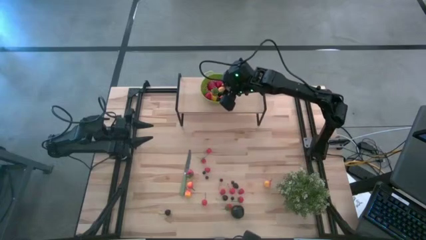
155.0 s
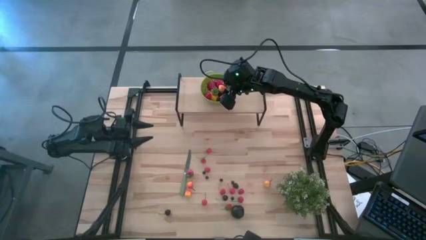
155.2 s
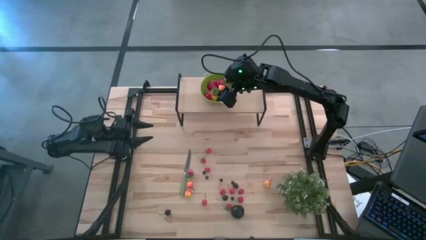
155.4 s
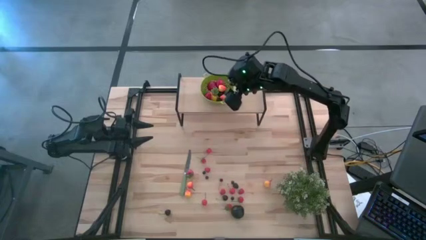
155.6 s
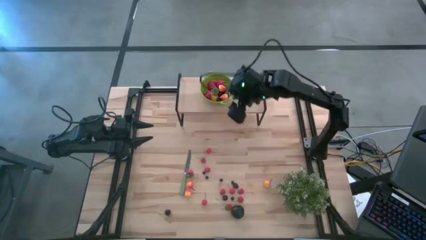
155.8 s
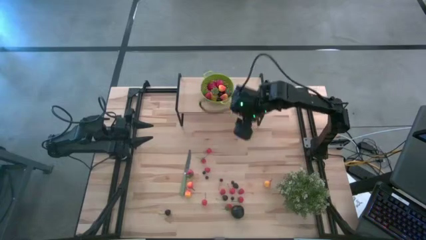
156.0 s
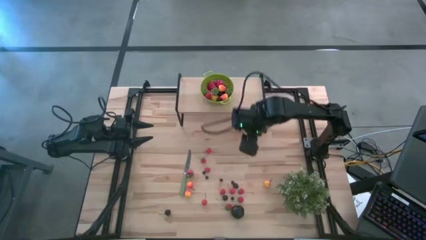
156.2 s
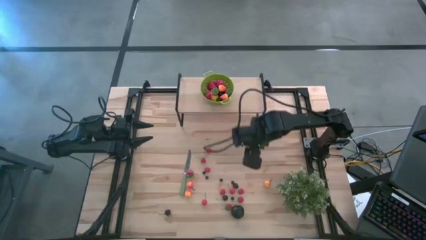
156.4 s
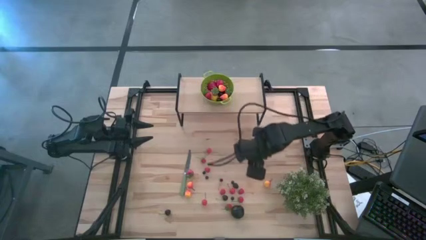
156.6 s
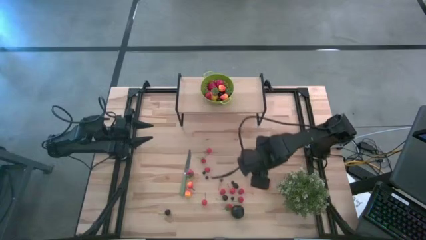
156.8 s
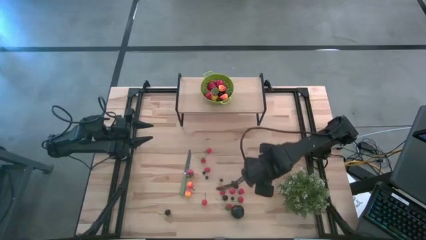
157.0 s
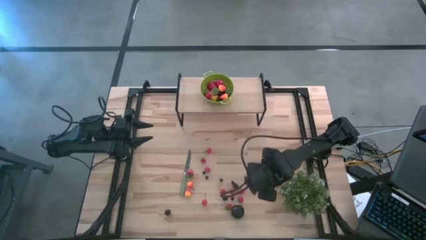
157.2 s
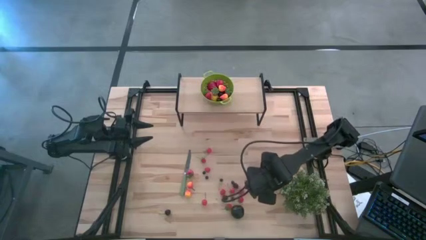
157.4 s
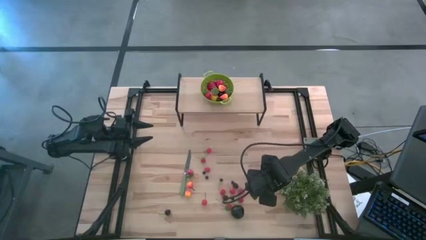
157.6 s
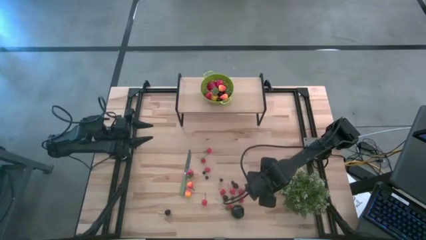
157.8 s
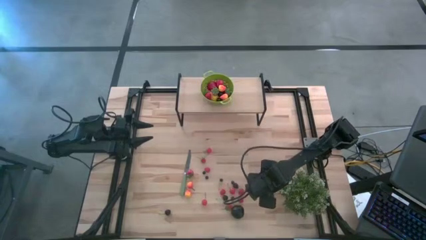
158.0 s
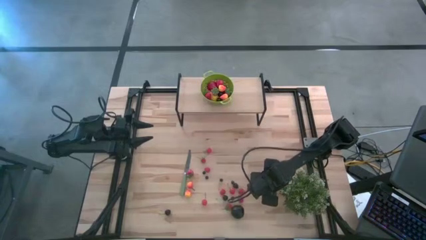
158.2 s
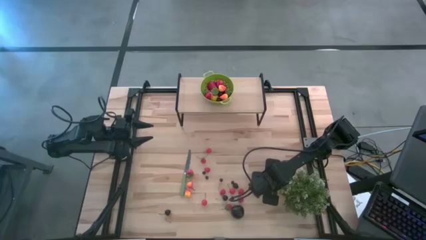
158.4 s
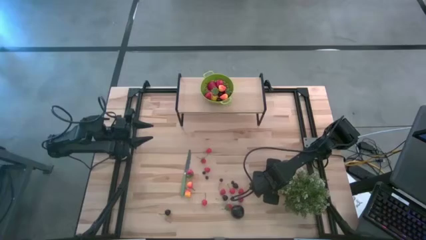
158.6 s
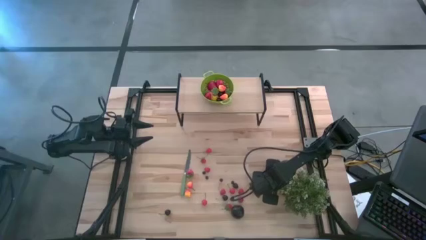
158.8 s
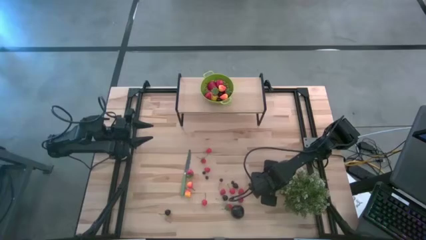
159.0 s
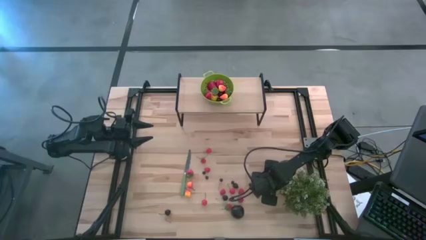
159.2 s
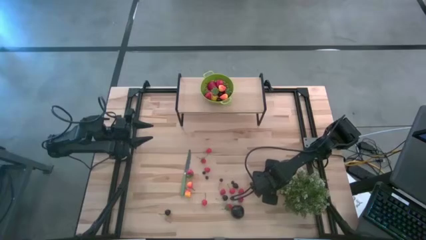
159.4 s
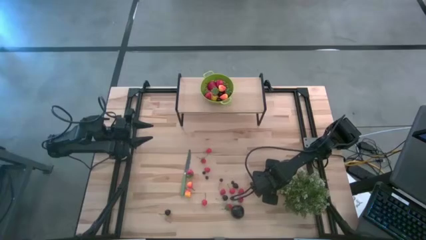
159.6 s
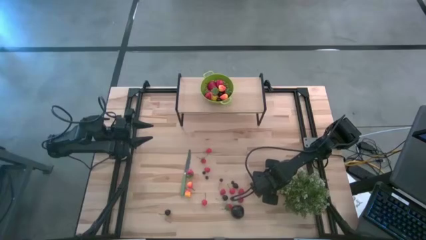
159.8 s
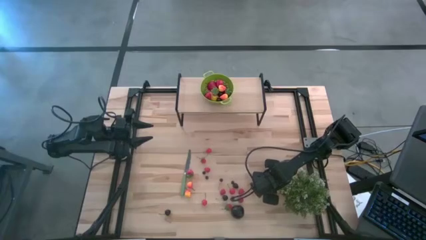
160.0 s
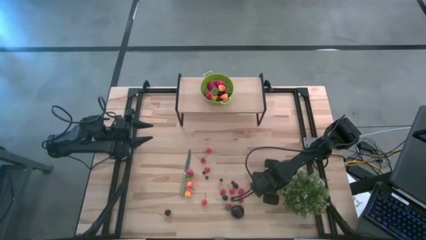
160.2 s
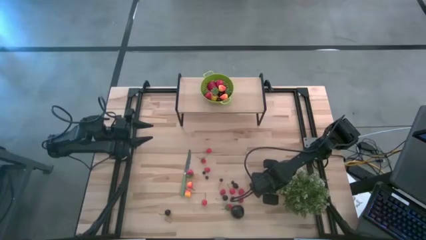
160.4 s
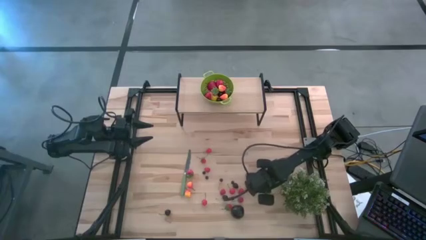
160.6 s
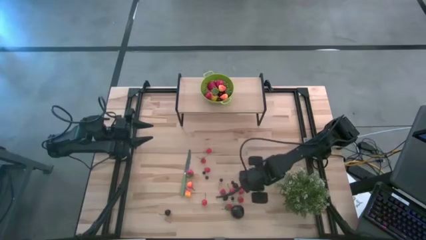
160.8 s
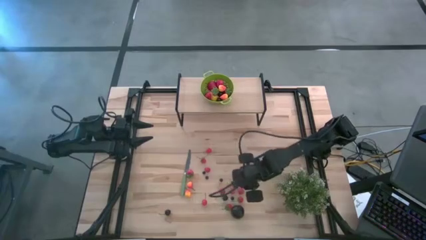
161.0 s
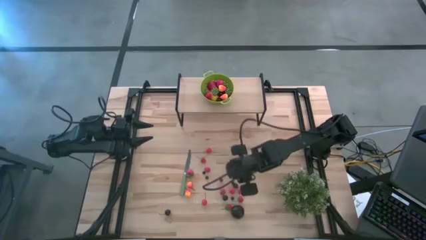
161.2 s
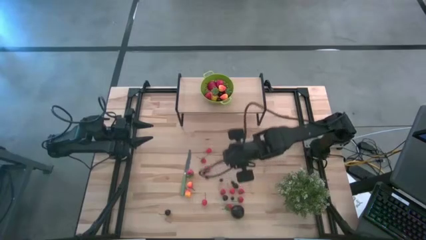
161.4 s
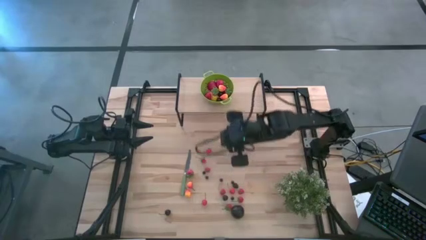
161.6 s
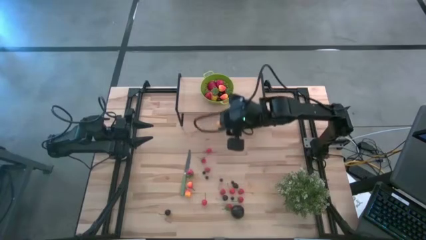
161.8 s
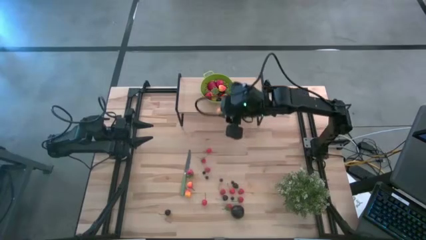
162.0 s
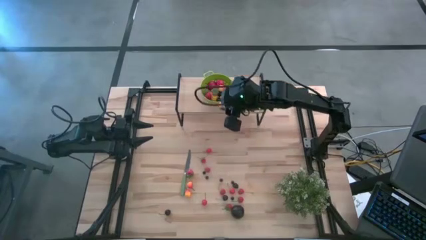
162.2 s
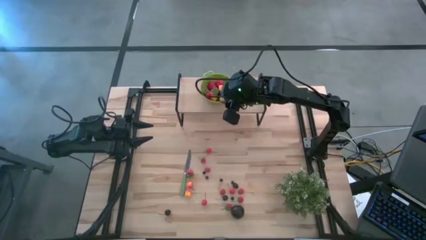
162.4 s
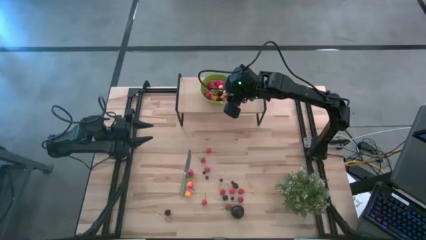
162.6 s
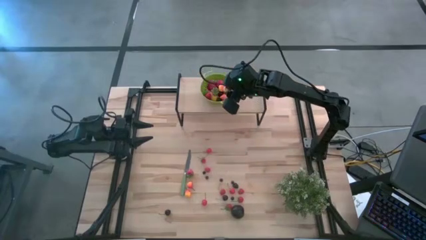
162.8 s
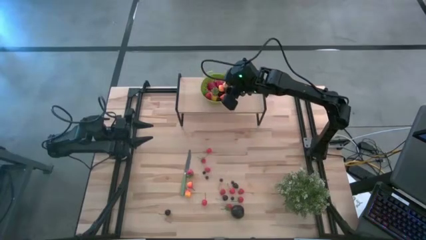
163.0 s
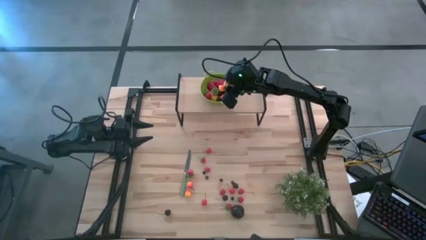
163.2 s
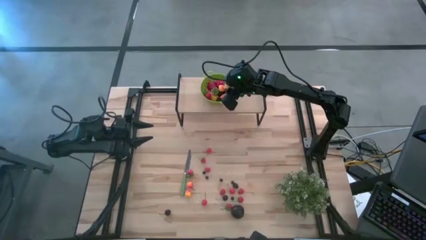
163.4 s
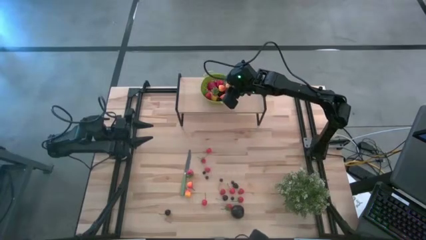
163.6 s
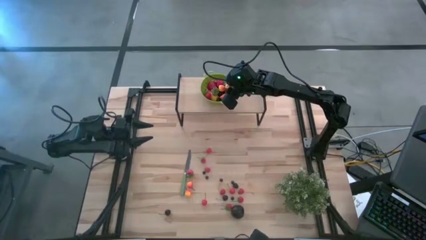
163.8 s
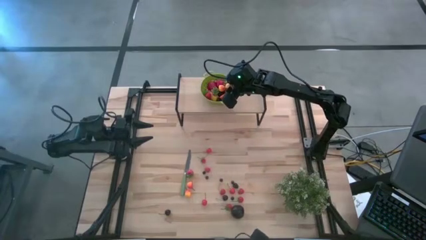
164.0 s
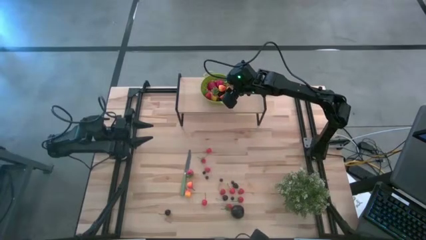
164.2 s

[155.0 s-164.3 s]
Task: Pick & Place Fruit
Put the pear into the green colander on the shelf

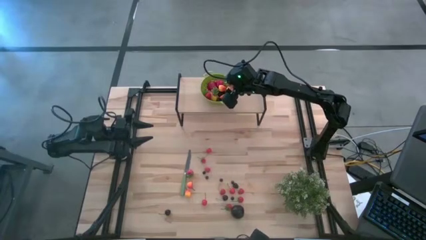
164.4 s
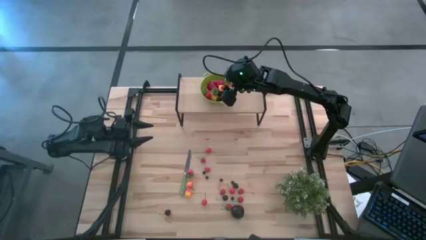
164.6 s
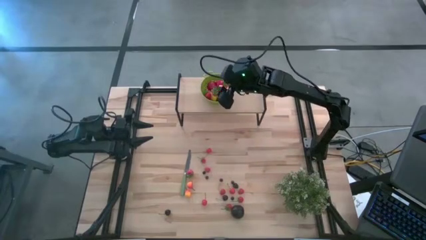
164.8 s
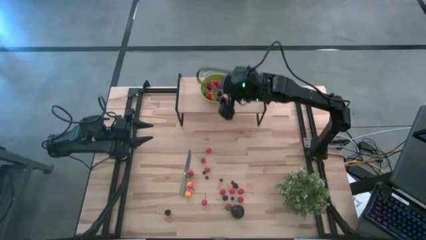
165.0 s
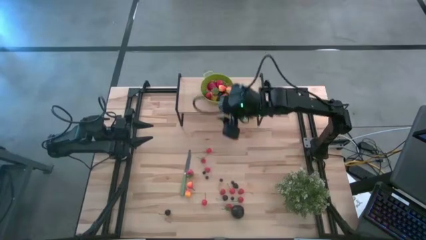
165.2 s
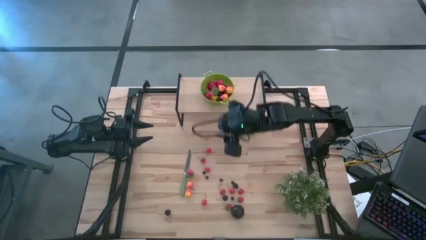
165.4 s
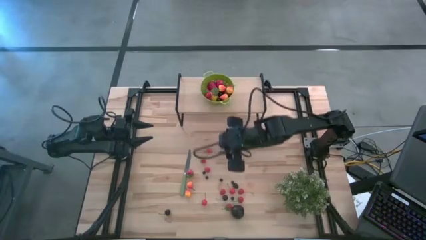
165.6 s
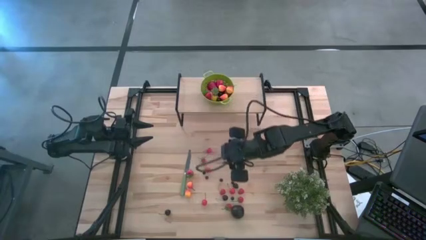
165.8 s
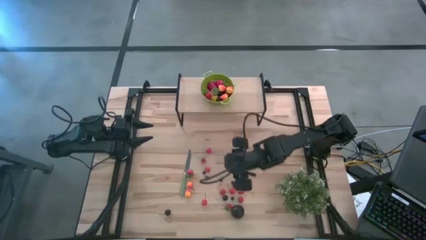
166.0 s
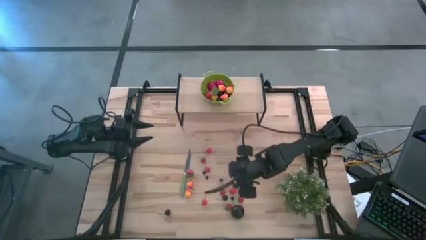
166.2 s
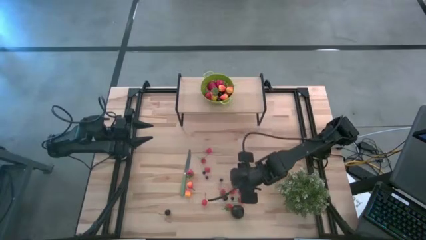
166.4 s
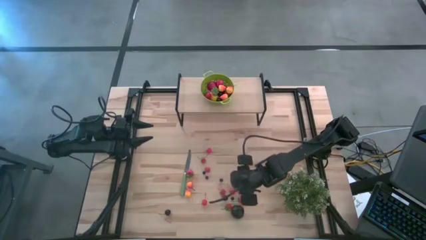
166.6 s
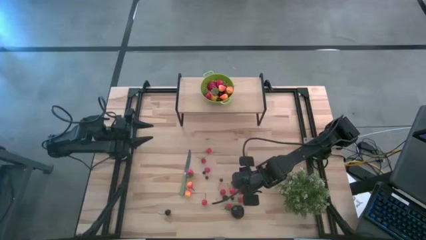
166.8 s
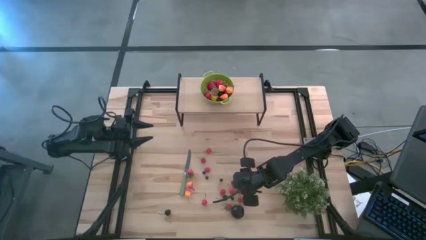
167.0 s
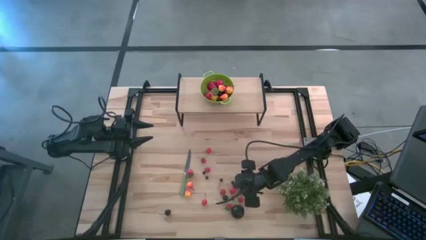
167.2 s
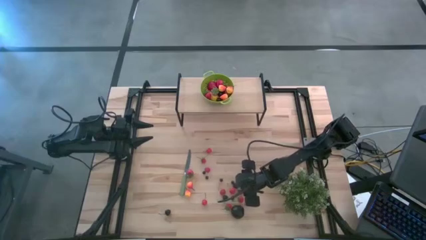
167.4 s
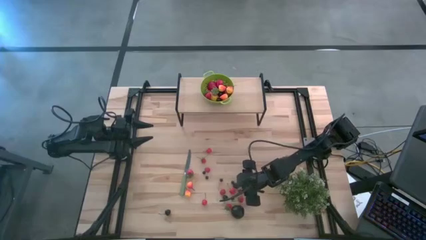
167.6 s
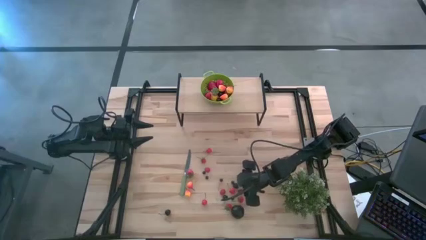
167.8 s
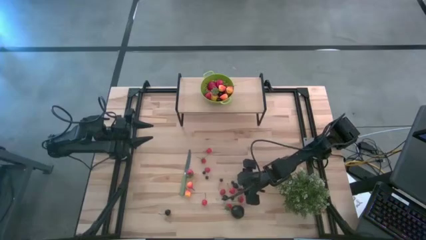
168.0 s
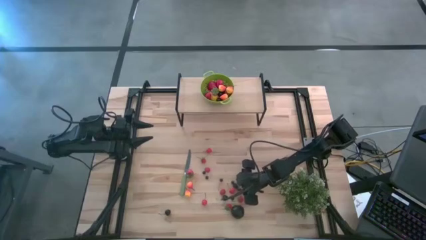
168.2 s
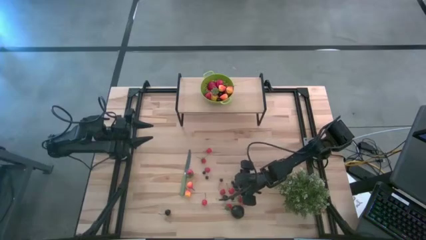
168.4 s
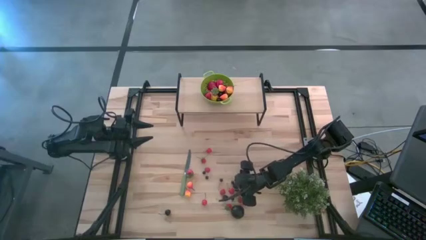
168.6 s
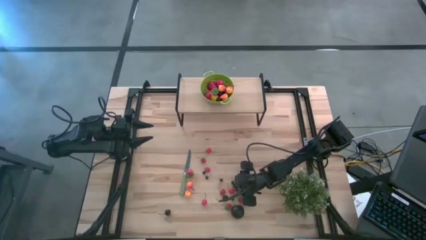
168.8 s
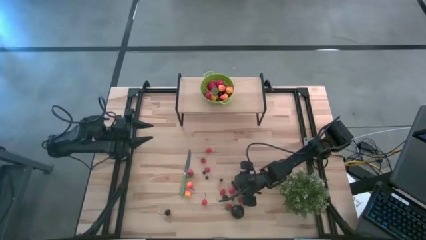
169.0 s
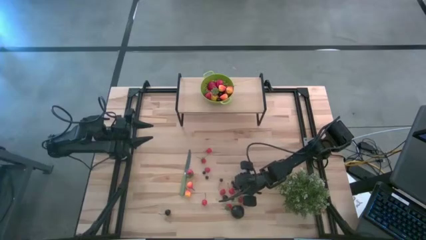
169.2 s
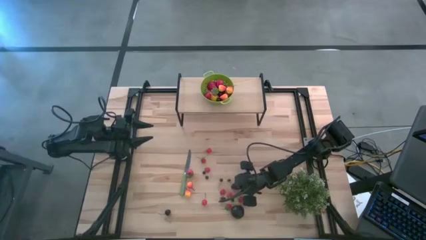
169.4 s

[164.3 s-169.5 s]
Put the blackberry into the green colander on the shelf

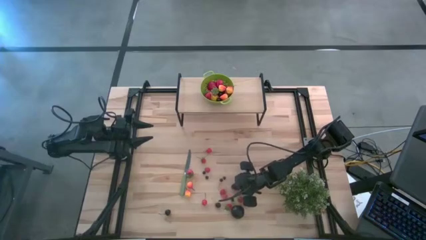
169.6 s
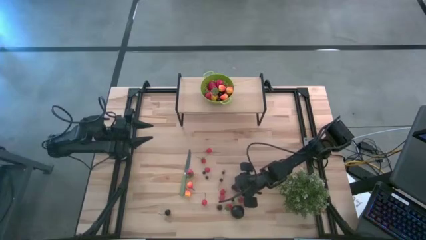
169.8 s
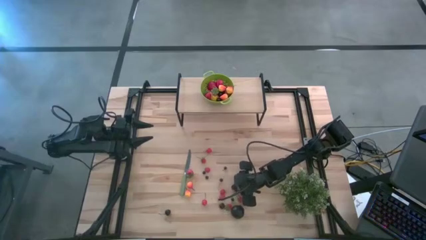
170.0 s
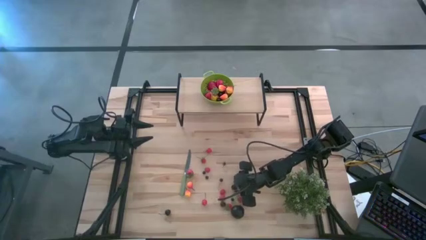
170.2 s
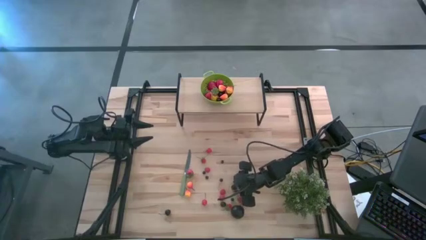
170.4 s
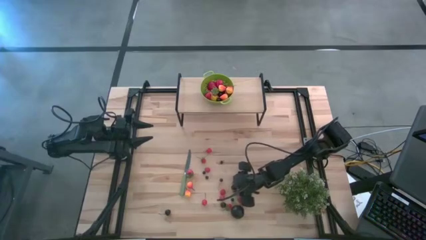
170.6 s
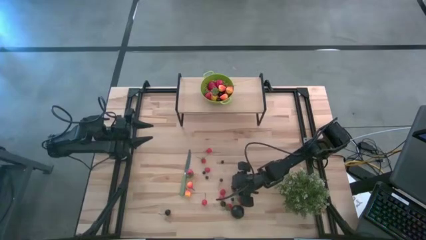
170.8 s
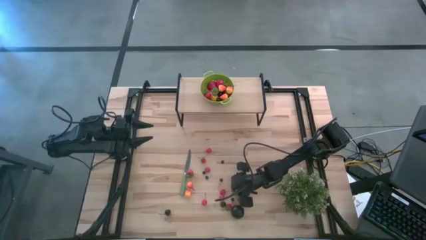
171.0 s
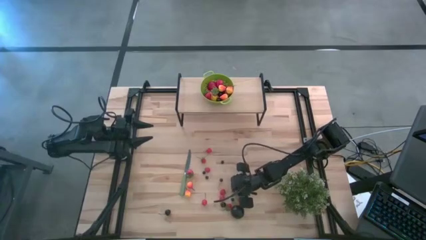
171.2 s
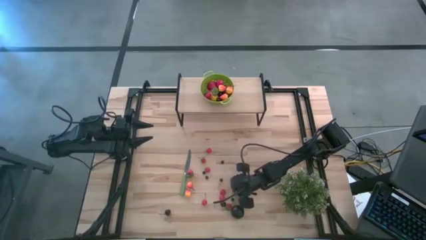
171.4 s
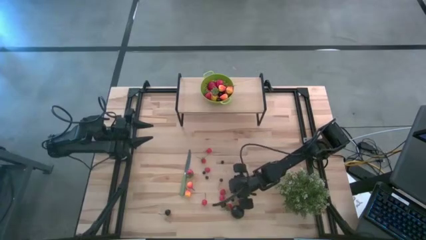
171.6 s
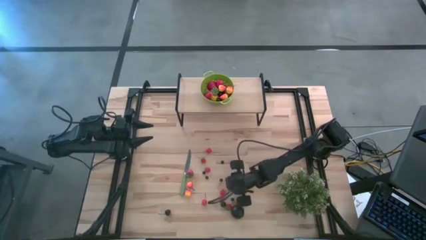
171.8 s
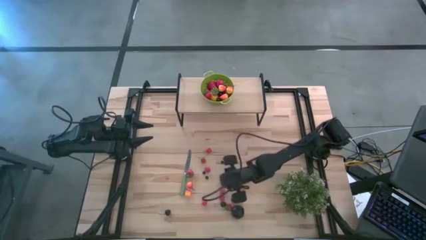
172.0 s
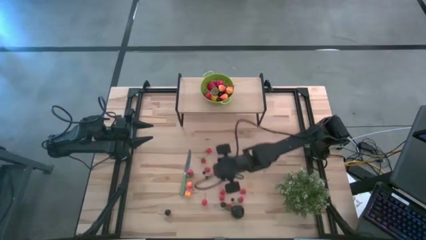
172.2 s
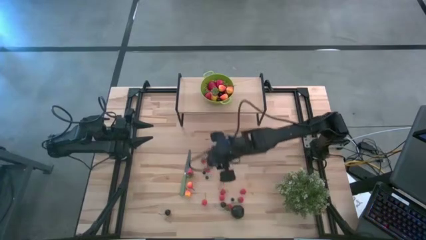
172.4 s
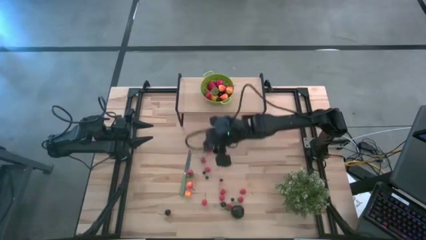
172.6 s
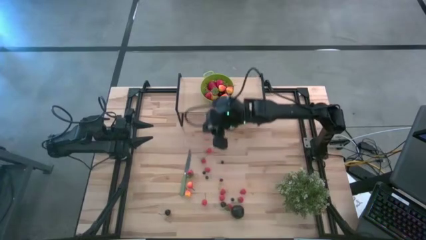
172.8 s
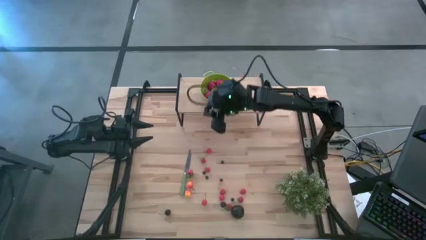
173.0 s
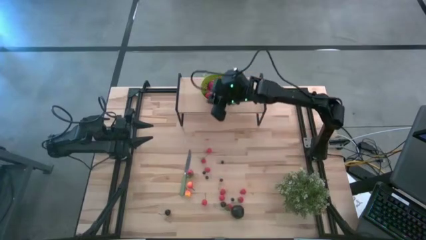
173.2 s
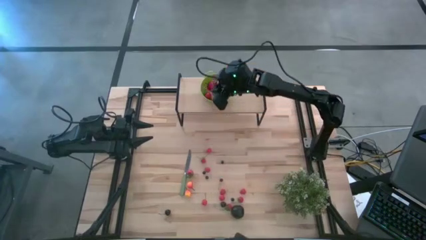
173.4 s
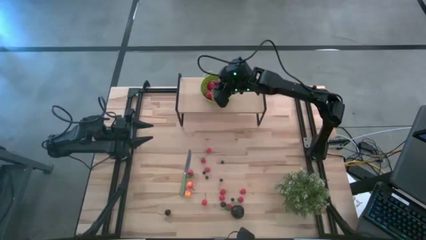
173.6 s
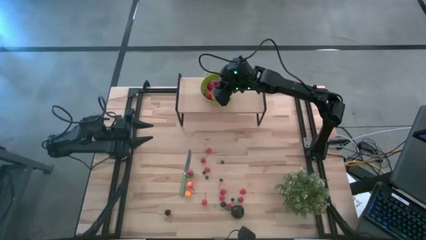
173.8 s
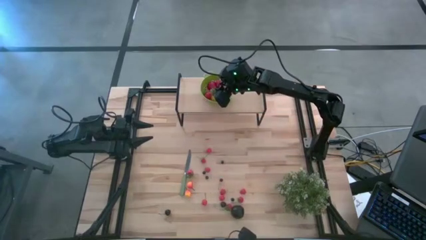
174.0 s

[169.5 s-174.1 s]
Put the blackberry into the green colander on the shelf
